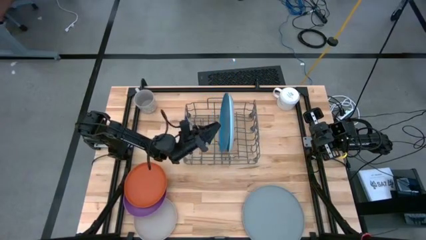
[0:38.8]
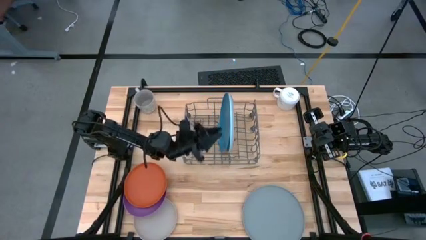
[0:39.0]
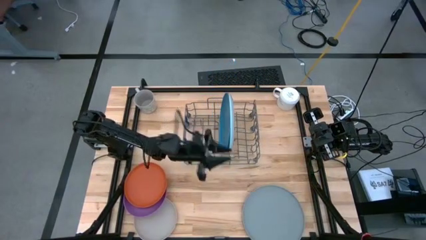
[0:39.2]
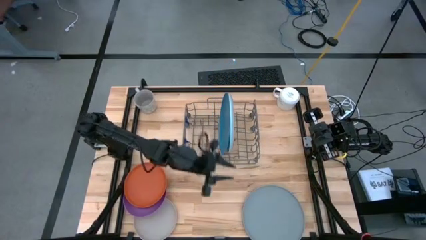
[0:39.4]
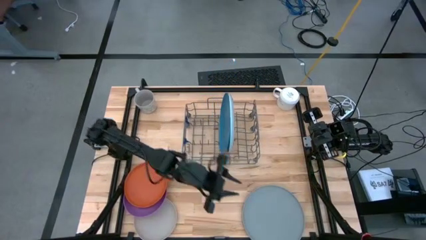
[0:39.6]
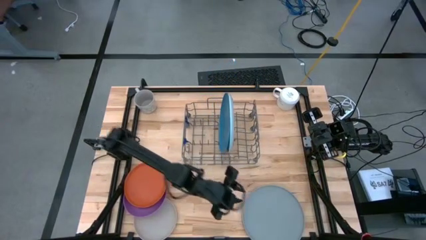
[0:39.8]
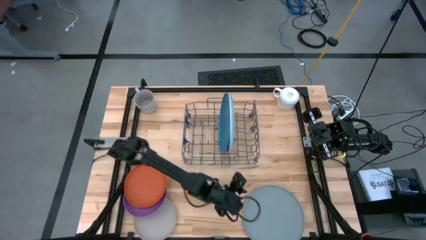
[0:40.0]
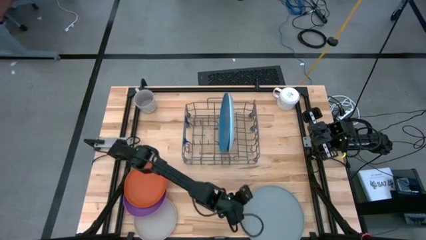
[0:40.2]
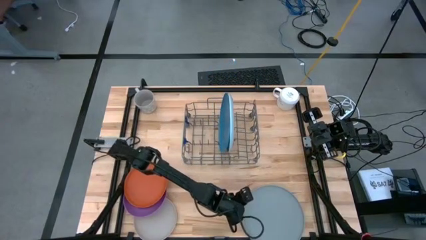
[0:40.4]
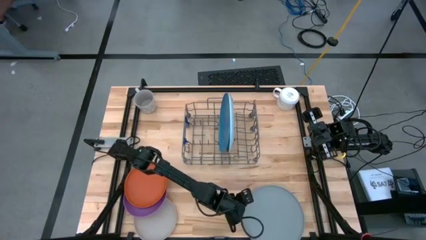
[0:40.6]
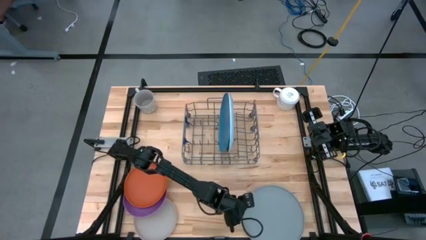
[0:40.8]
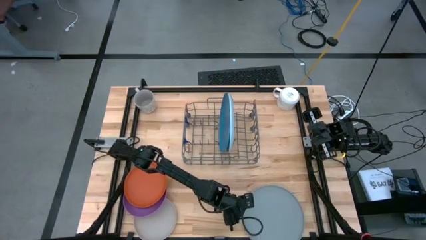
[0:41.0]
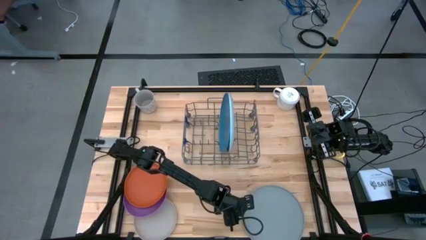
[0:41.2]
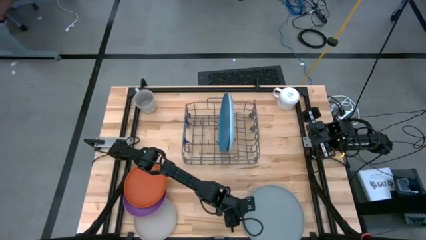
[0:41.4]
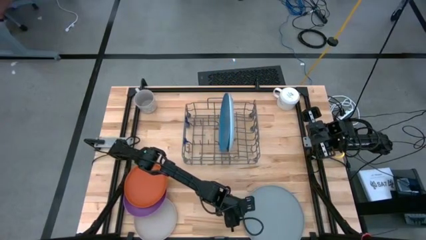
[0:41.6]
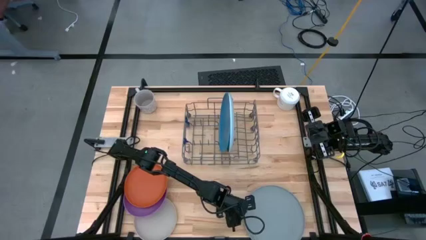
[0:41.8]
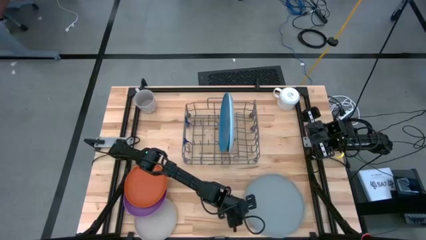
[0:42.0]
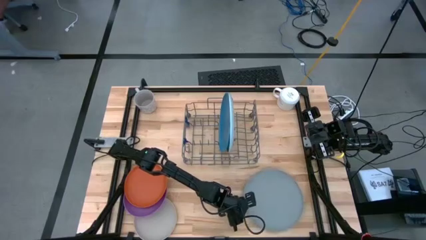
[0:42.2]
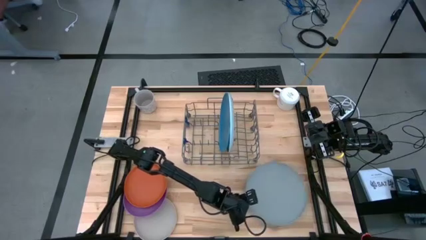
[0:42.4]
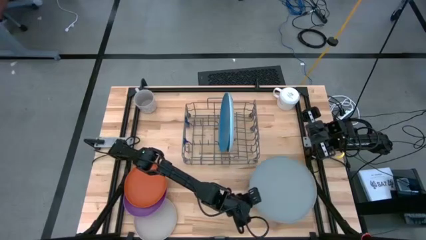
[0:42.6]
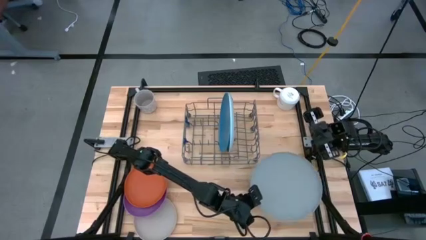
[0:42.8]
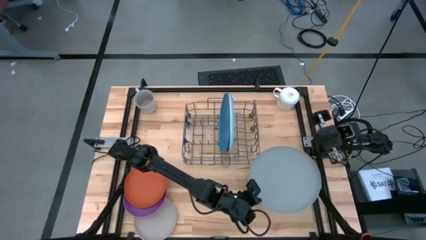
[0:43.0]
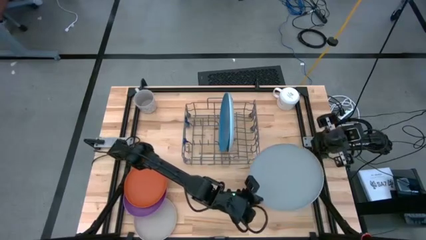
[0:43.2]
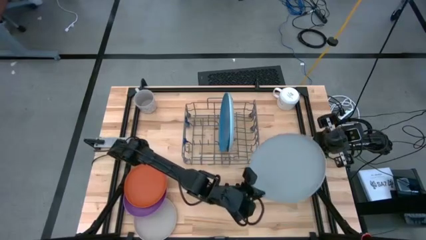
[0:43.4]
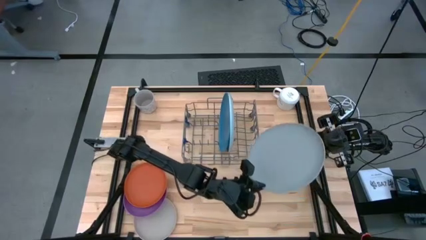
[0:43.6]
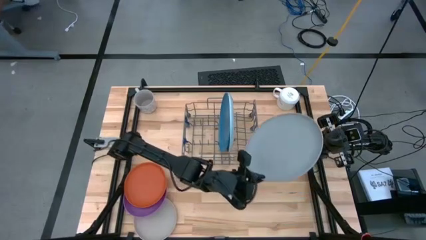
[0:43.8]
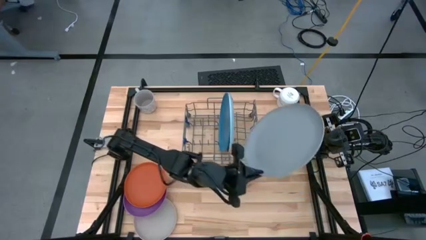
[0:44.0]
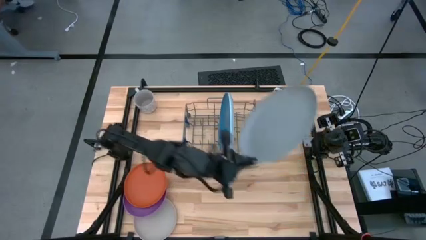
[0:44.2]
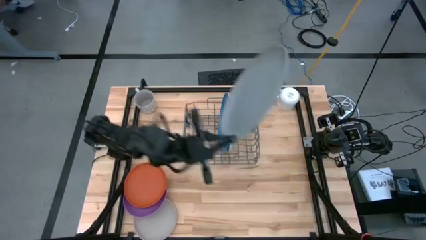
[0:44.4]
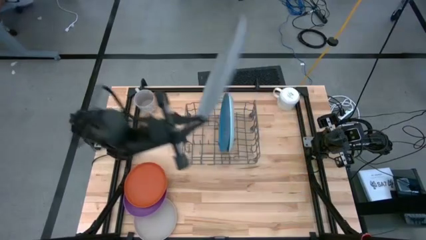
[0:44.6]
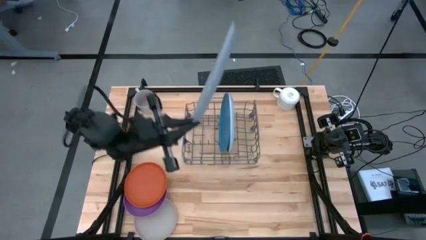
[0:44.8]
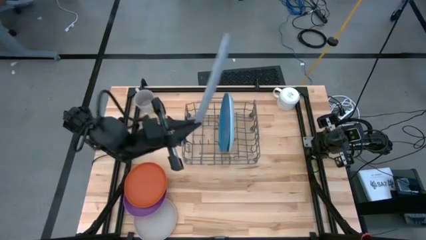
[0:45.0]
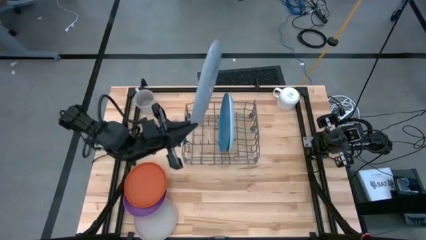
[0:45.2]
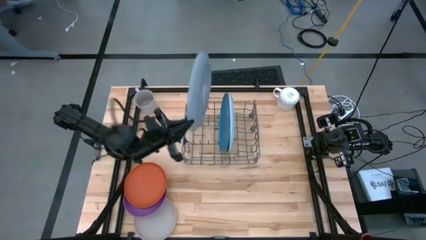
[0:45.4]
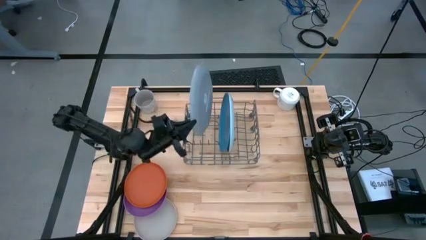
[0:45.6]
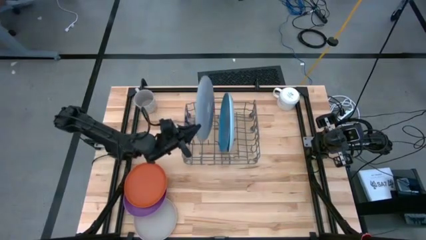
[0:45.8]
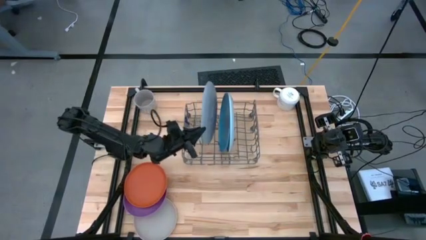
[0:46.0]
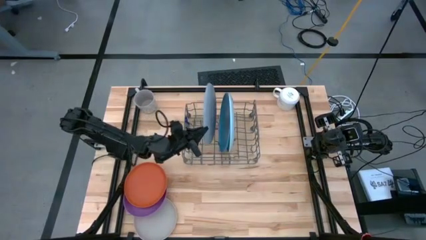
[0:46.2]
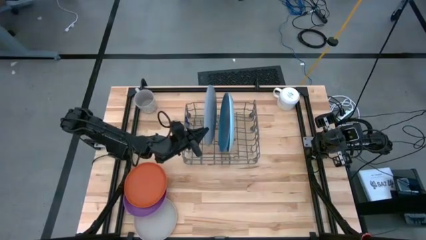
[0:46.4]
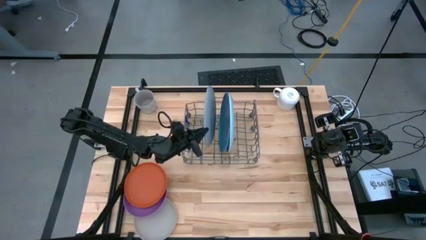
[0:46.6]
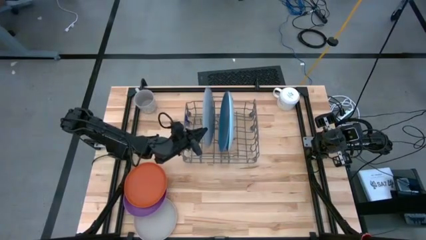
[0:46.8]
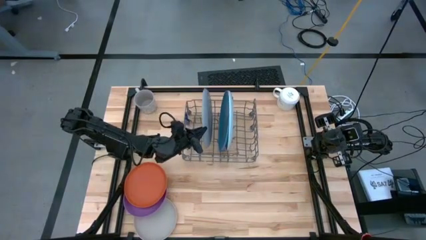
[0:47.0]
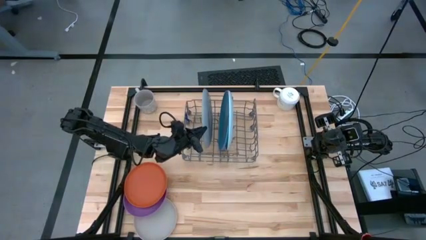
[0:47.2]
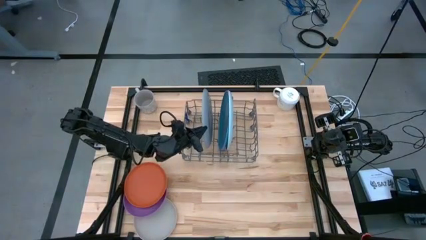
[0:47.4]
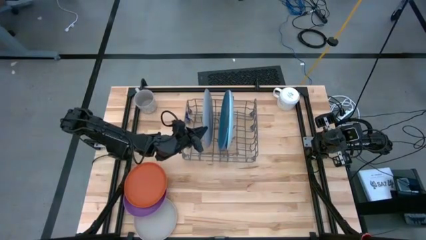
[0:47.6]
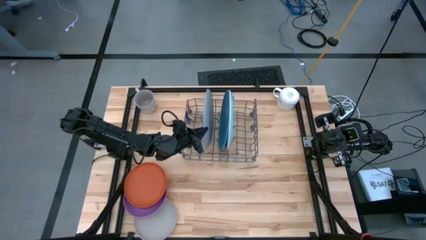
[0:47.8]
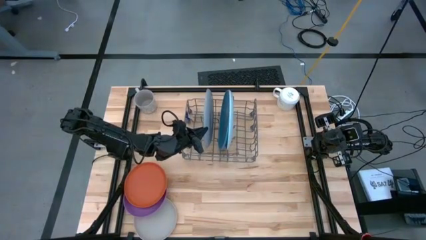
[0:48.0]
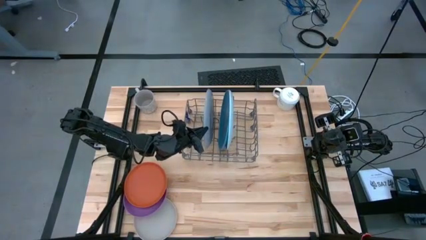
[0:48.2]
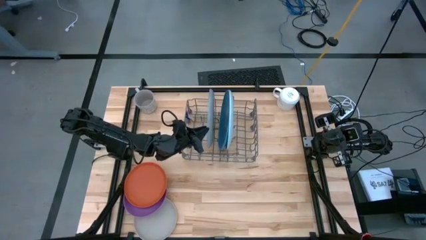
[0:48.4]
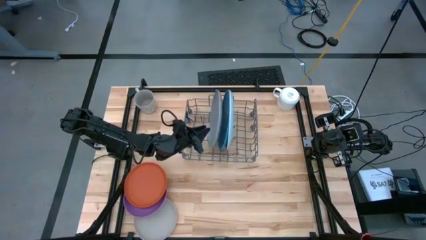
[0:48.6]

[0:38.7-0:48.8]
Task: Sort dishes
Put the gray plate in the dish rack

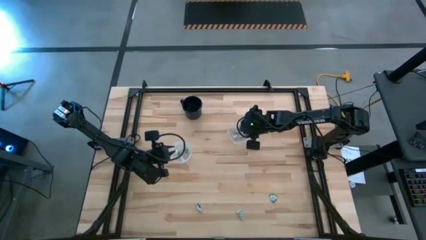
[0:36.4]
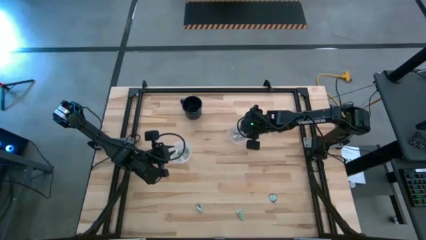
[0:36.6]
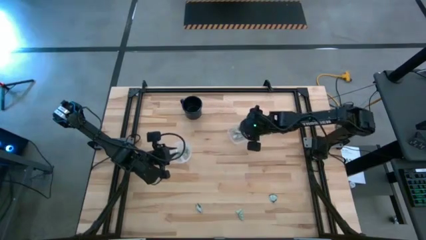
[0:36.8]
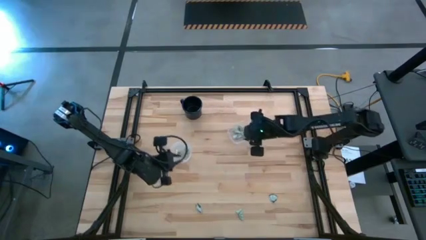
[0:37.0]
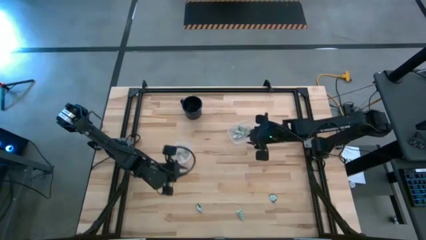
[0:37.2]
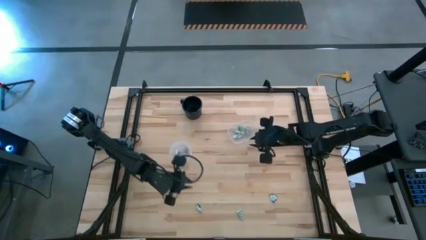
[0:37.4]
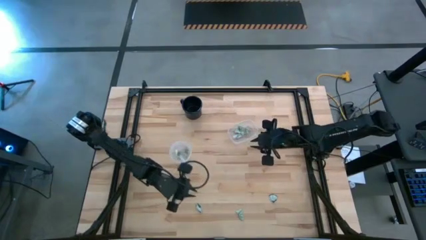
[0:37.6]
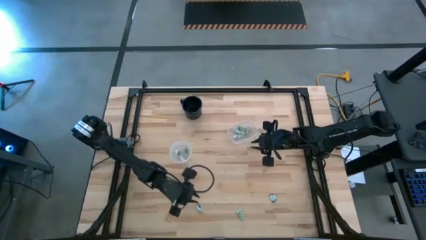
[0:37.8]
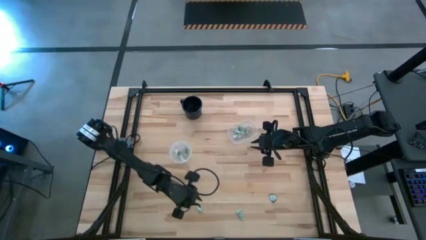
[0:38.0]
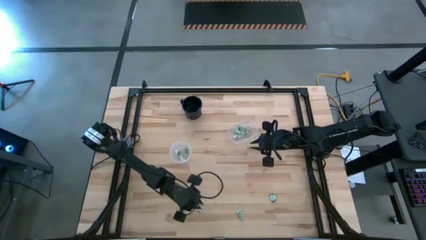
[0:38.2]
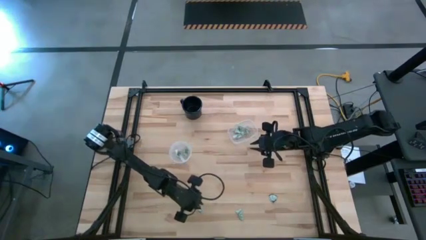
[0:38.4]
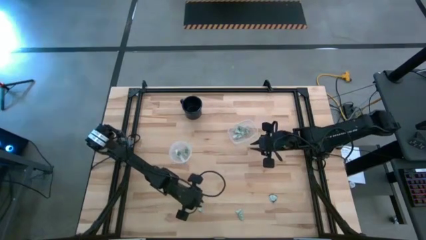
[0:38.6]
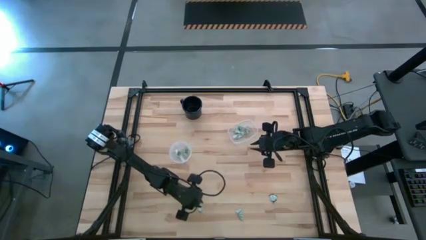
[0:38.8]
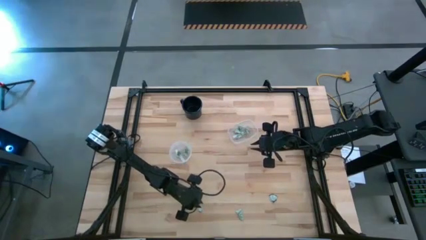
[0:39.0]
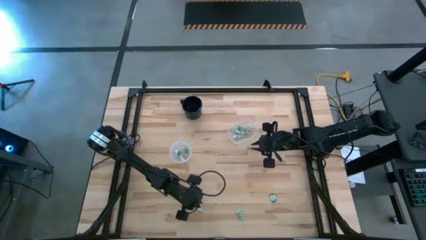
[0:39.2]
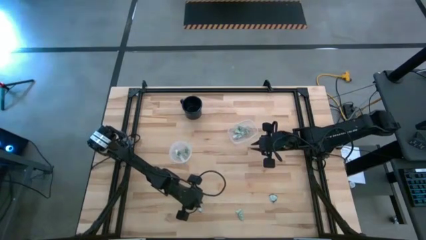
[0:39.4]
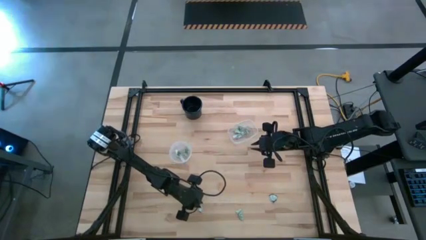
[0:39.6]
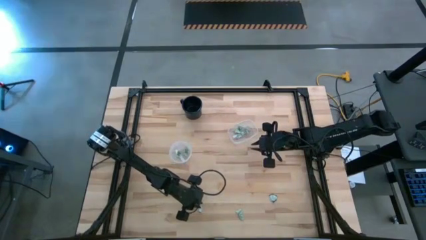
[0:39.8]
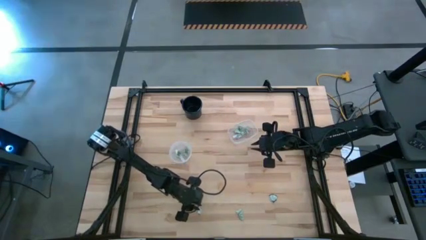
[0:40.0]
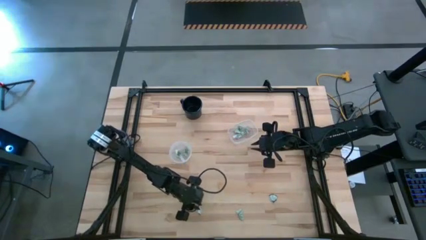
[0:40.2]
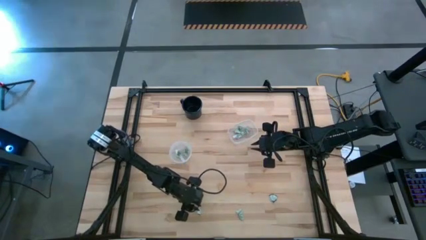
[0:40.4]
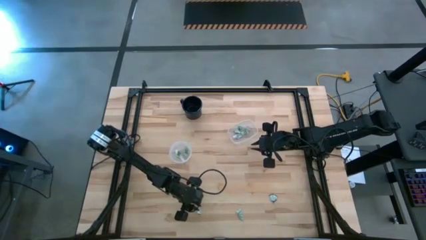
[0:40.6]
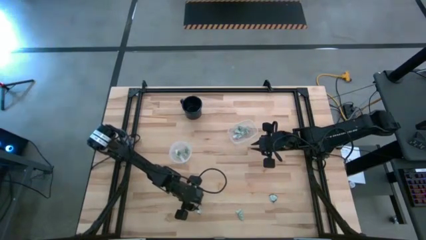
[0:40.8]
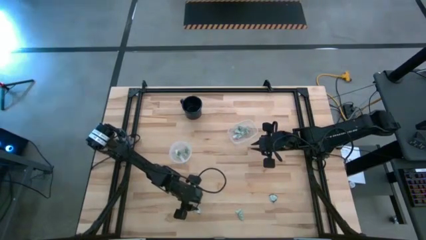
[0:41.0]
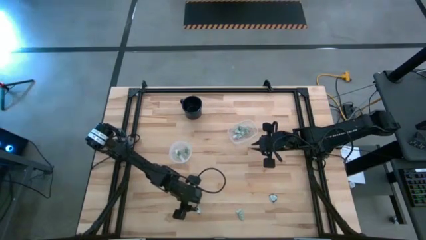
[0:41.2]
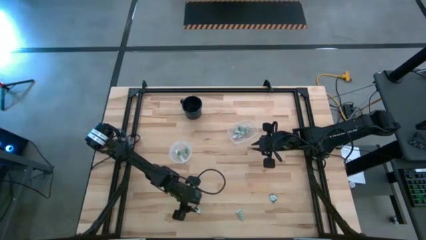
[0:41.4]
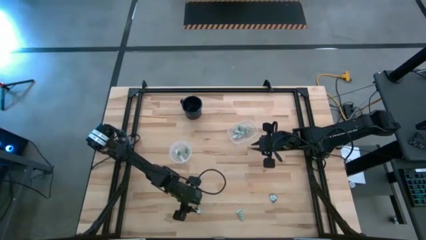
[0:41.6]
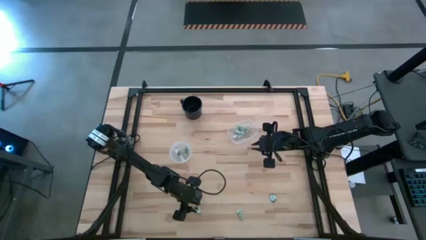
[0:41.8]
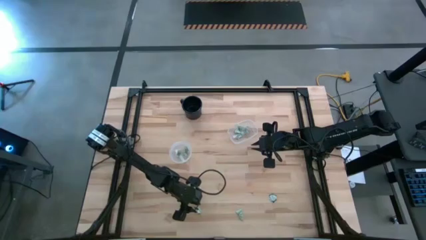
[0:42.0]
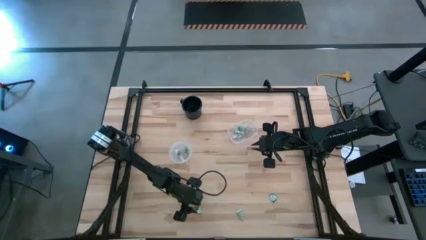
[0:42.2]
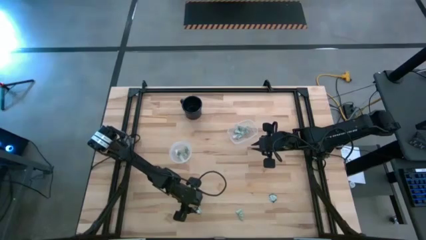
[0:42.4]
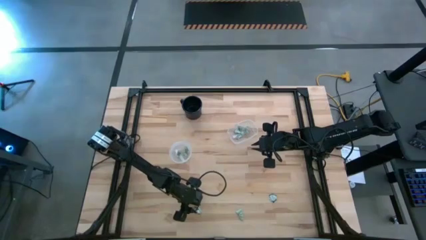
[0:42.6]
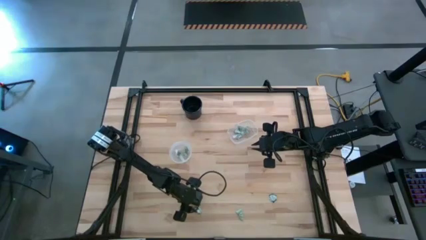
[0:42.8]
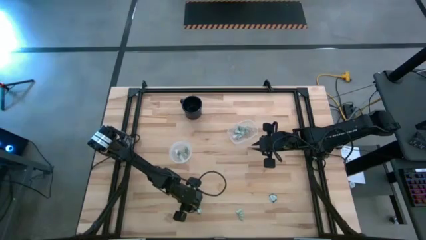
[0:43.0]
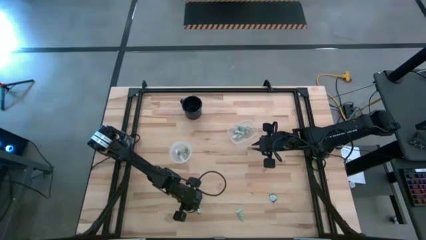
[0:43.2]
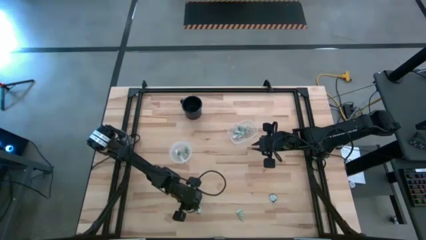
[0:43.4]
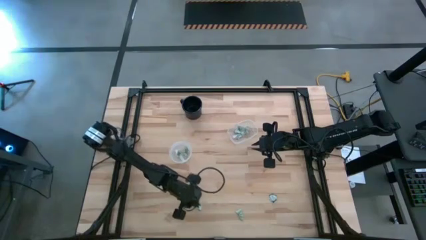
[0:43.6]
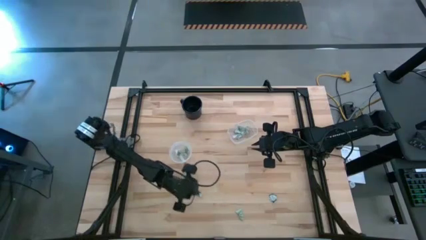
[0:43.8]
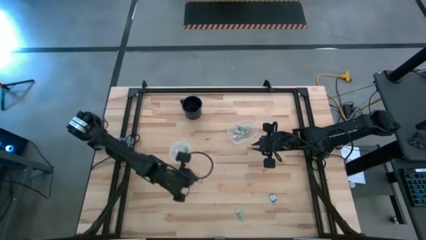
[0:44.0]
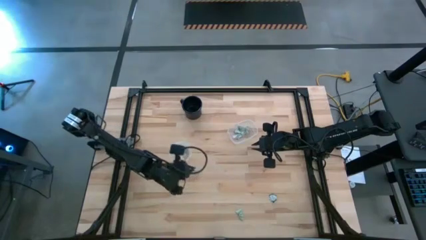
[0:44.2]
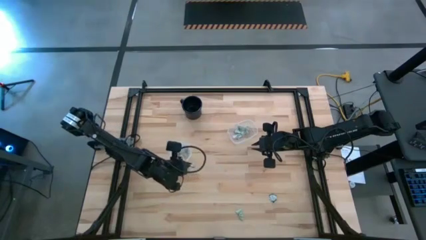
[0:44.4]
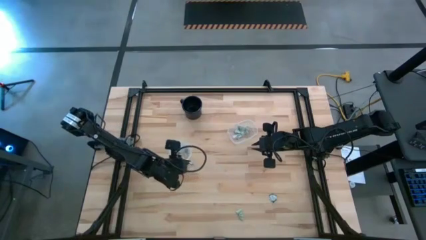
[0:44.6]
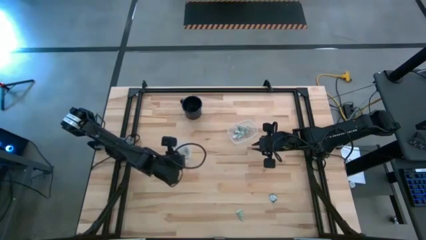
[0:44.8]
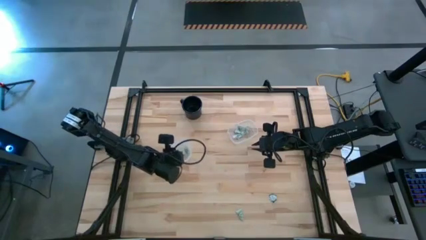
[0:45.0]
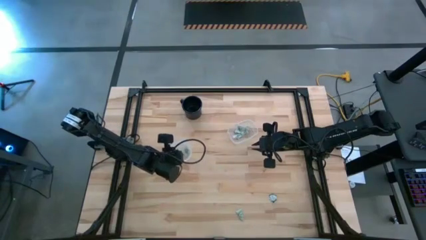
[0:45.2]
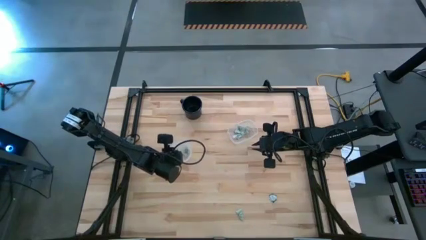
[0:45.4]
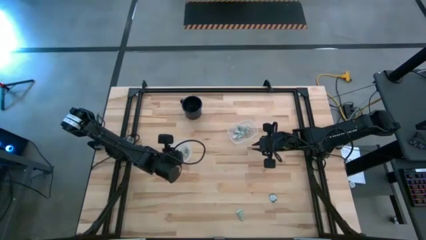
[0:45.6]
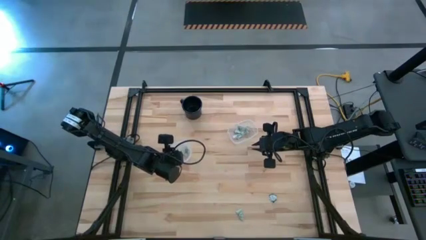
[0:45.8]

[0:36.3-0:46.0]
Task: Pick and place items into bin
Put the truvia packet into the circle transparent bin
